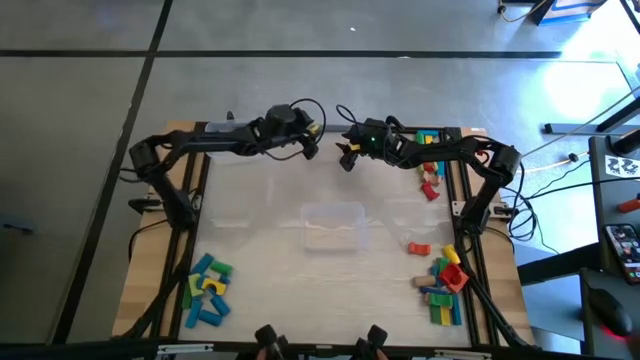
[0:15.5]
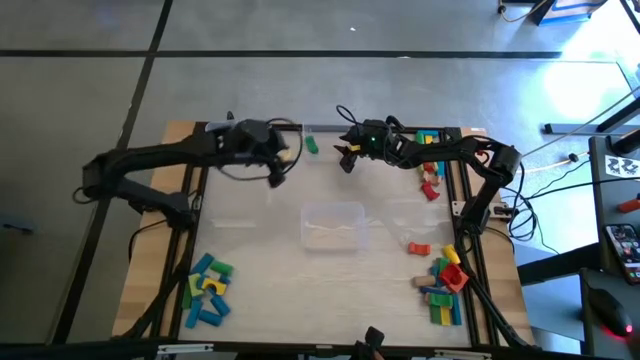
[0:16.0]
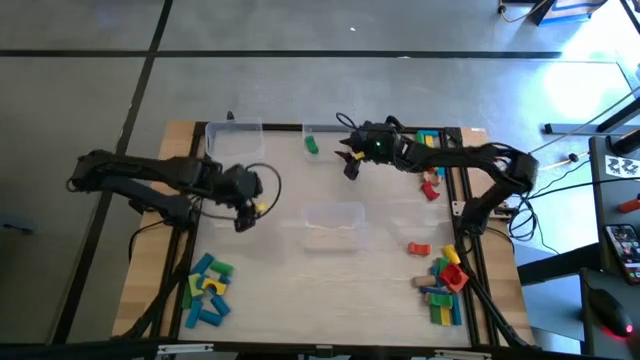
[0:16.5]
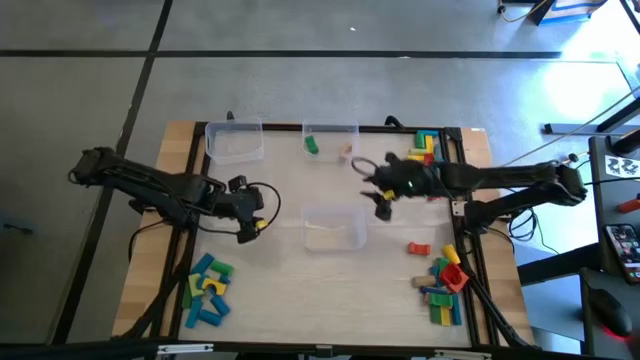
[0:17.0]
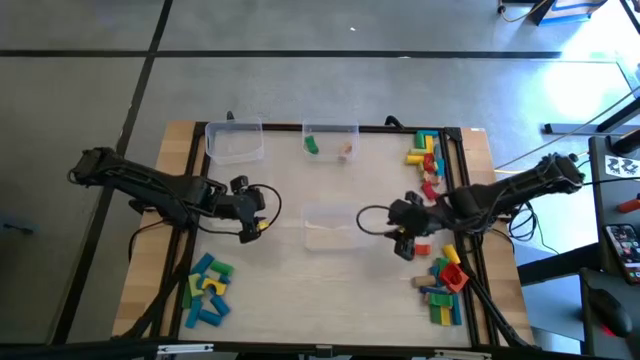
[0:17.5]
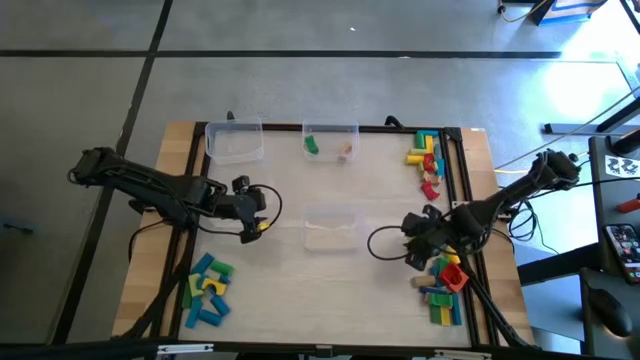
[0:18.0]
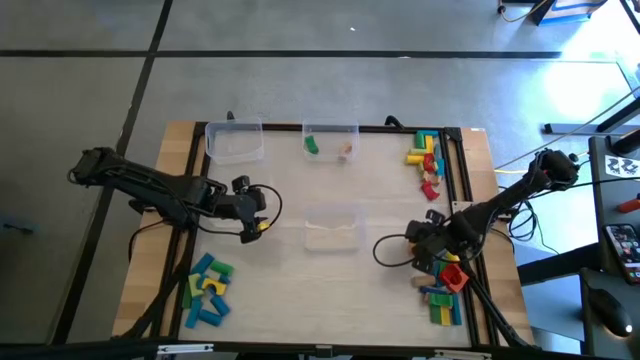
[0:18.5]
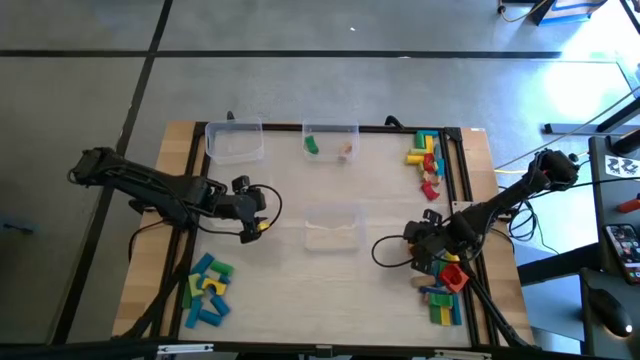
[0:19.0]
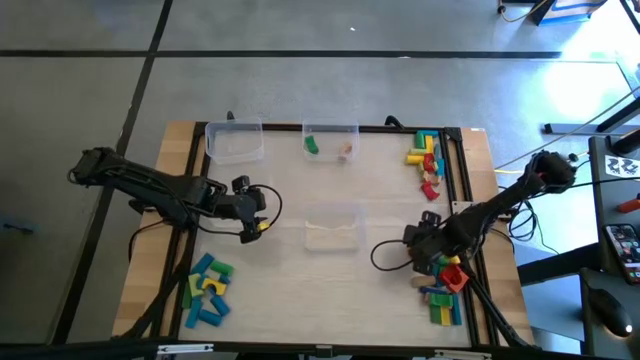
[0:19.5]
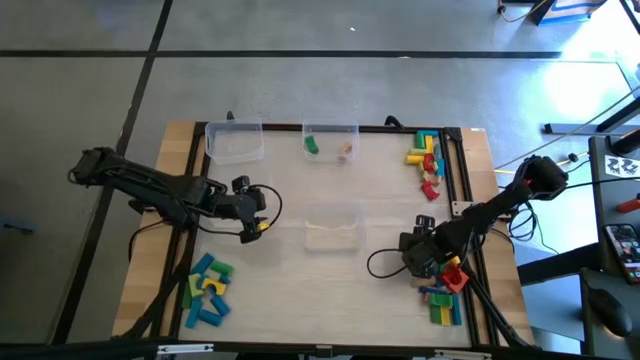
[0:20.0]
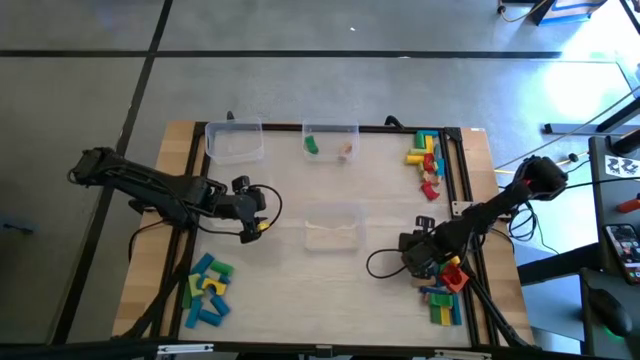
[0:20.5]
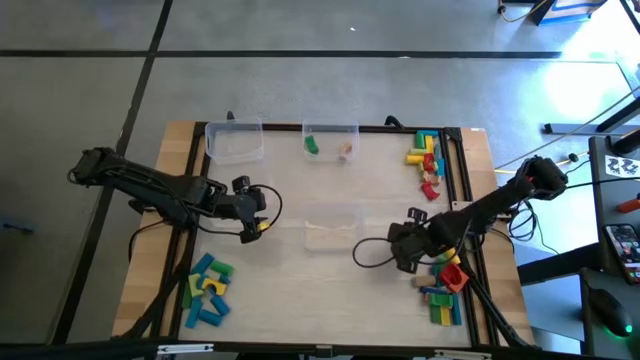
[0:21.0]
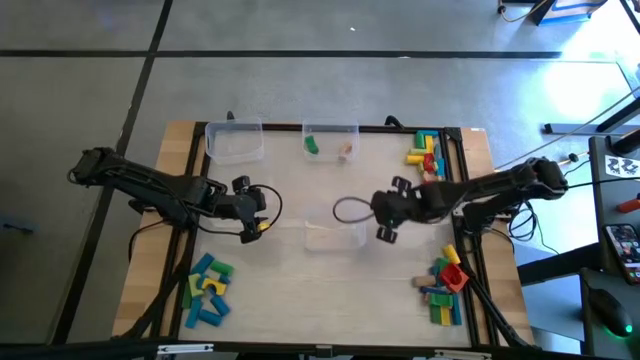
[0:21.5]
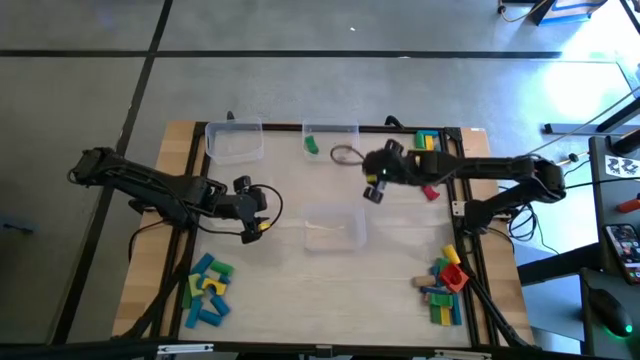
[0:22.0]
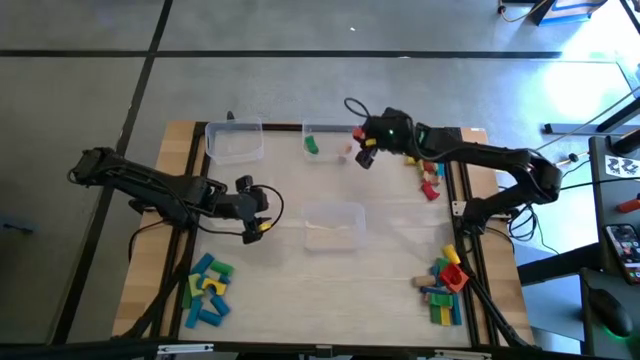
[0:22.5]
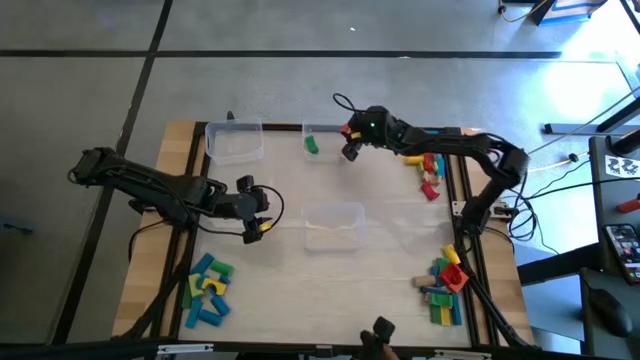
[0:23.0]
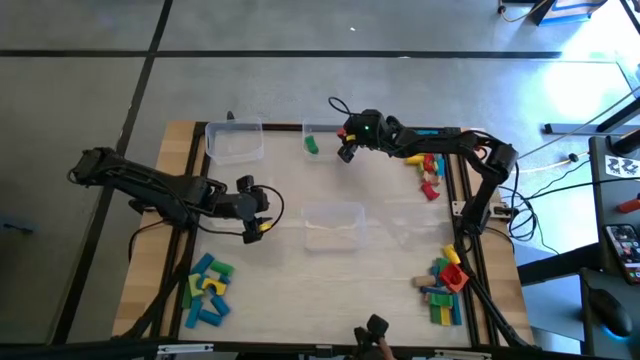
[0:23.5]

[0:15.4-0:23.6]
Task: Sort blocks by size
Put the orange arch block into the top right transparent bin

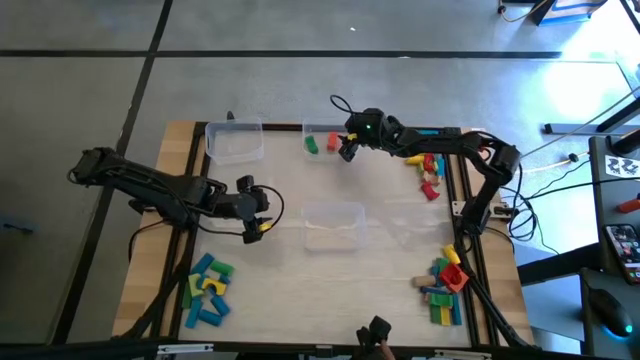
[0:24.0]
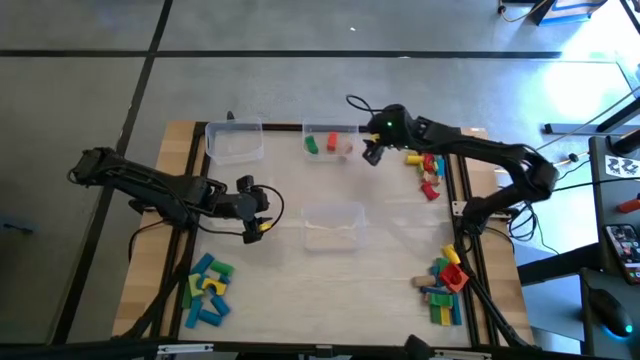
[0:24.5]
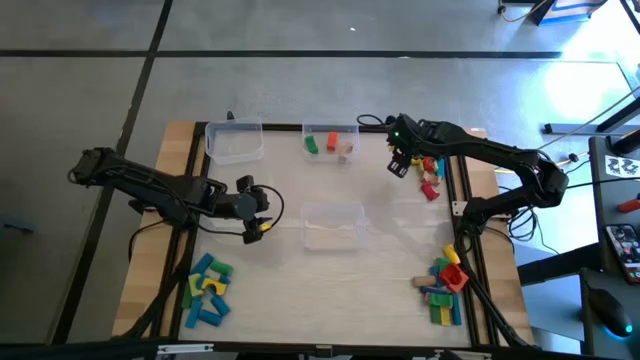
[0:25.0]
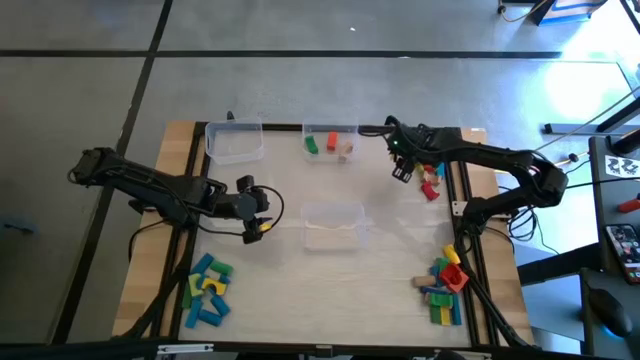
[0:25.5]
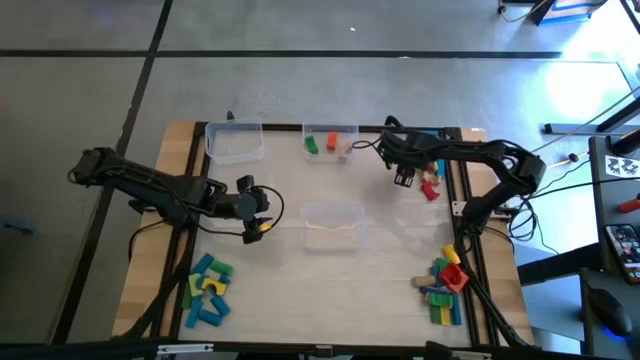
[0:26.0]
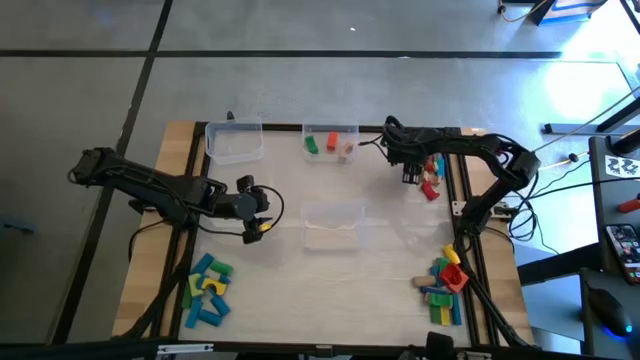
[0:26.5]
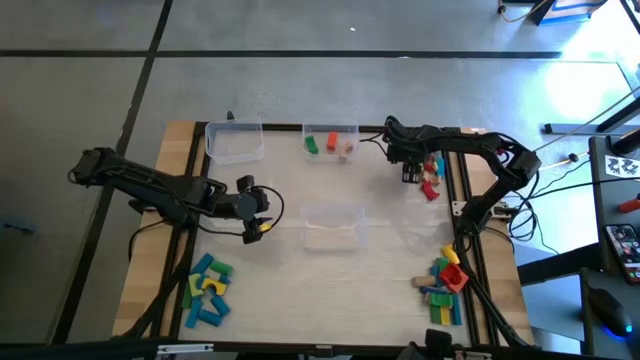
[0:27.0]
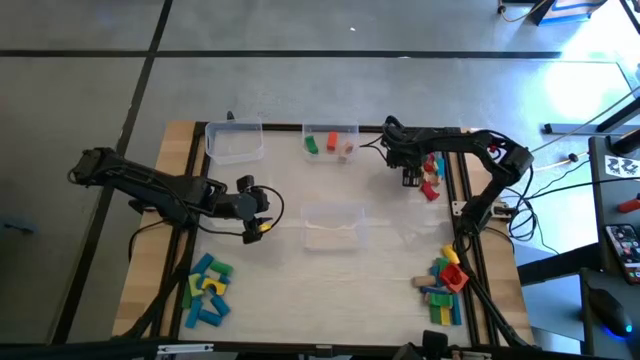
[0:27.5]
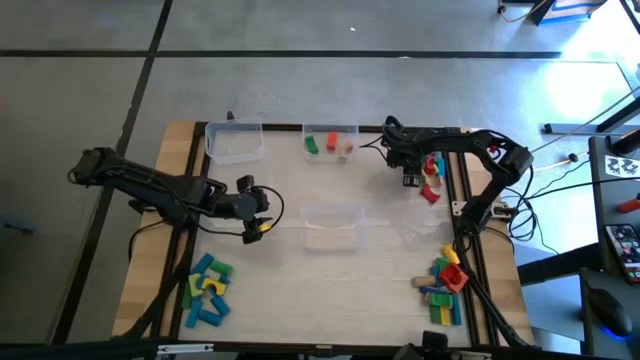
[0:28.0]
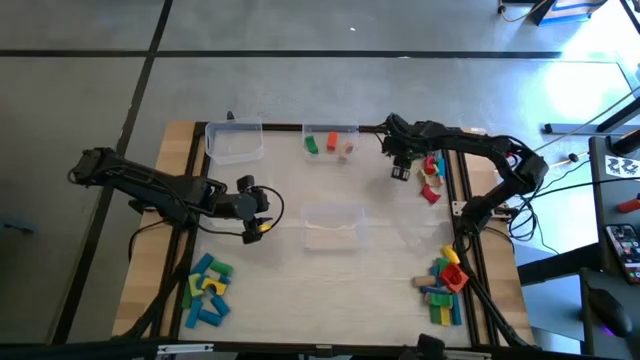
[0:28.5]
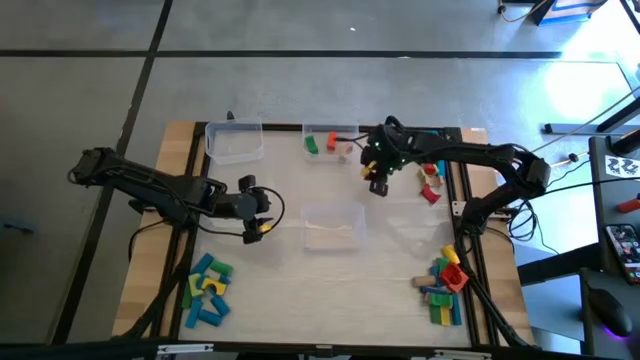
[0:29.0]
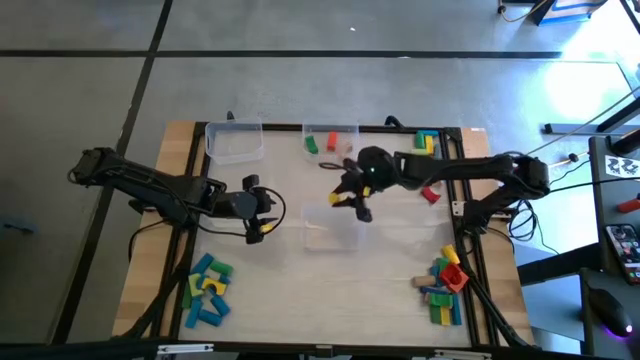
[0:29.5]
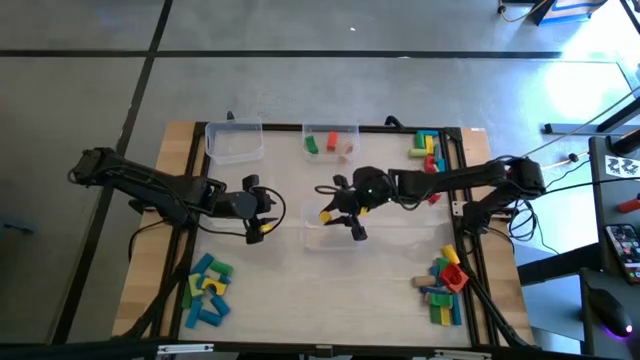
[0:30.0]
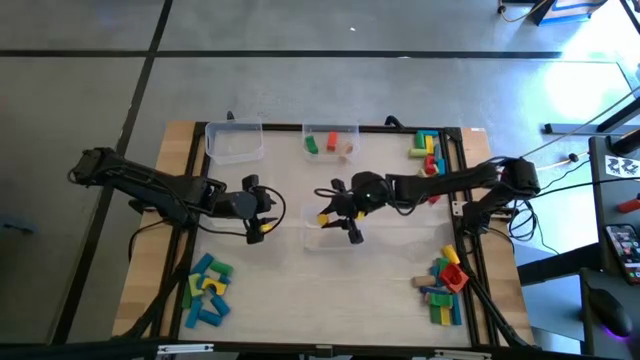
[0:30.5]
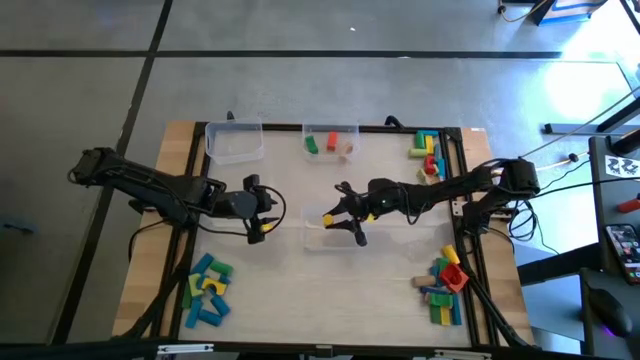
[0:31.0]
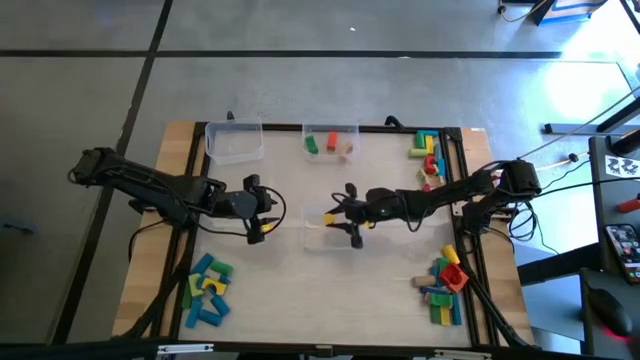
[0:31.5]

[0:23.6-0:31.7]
Put the yellow cylindrical block into the bottom transparent bin
